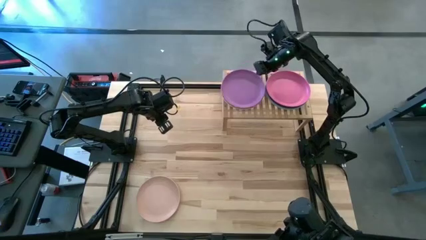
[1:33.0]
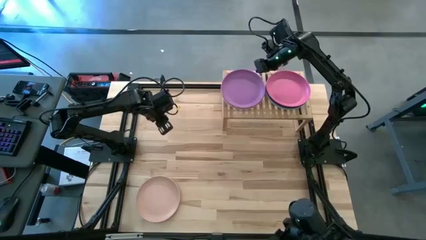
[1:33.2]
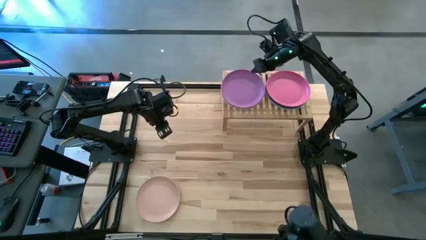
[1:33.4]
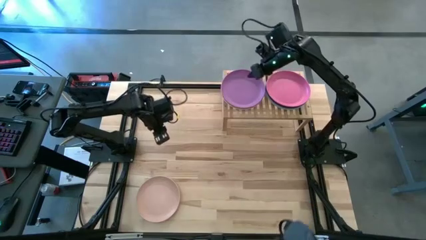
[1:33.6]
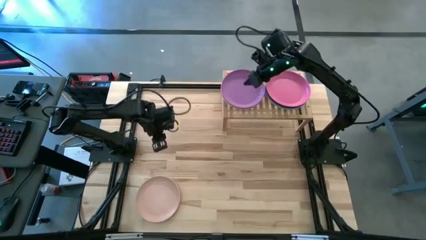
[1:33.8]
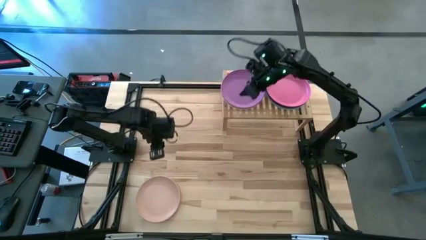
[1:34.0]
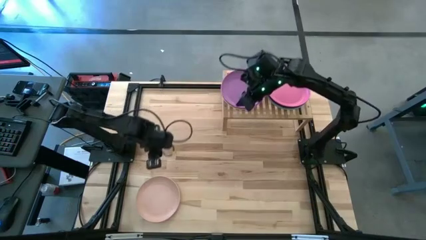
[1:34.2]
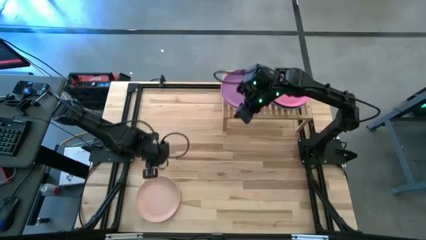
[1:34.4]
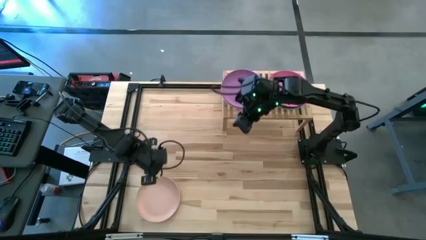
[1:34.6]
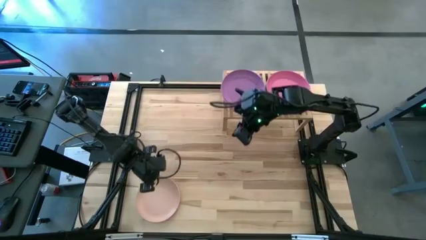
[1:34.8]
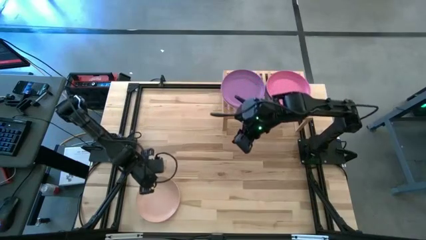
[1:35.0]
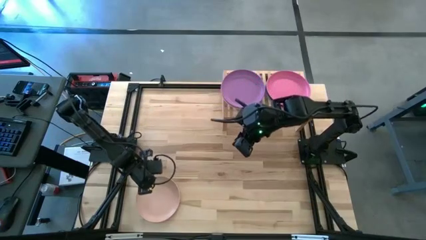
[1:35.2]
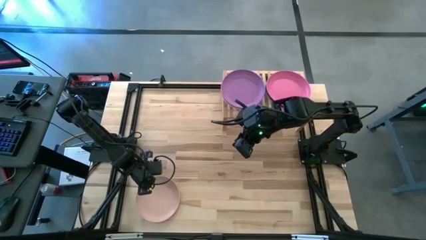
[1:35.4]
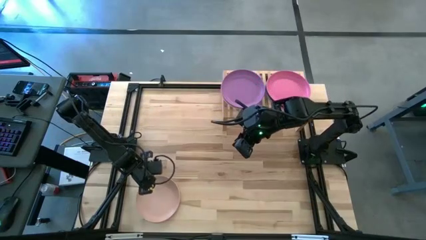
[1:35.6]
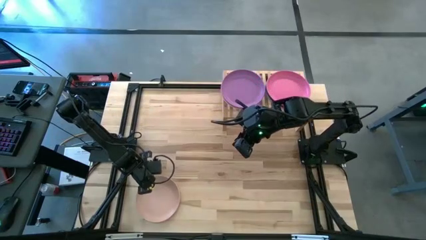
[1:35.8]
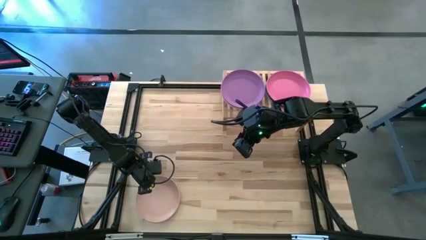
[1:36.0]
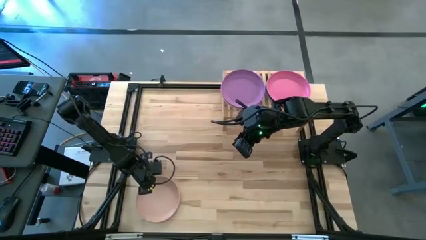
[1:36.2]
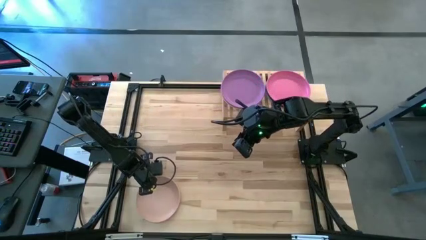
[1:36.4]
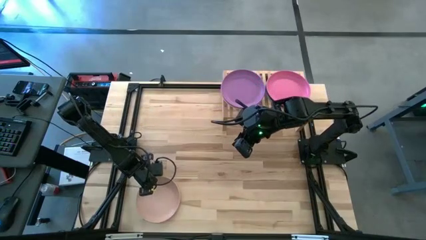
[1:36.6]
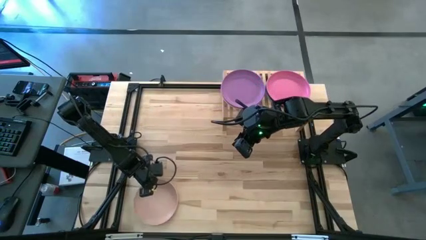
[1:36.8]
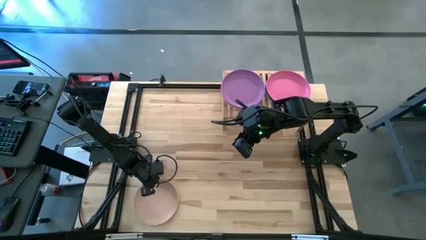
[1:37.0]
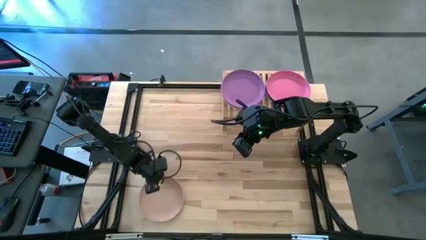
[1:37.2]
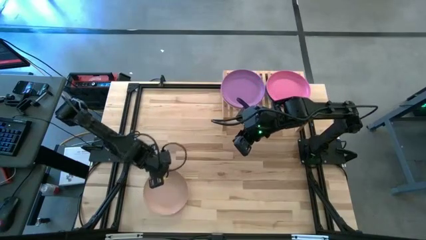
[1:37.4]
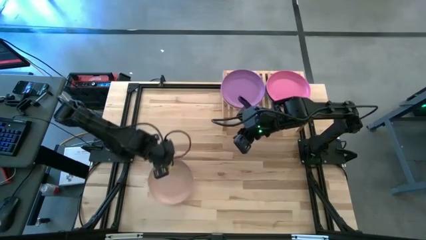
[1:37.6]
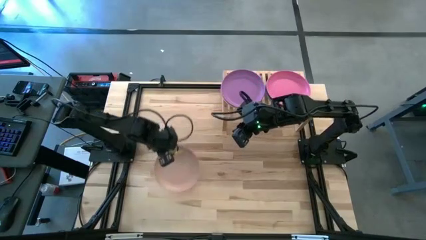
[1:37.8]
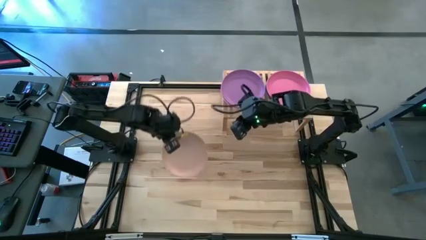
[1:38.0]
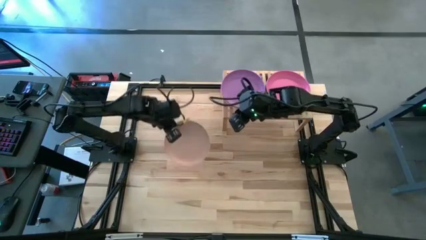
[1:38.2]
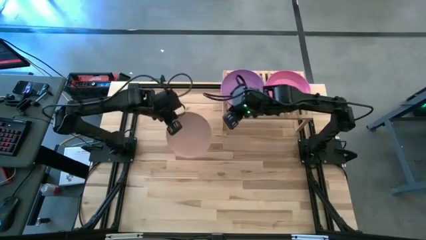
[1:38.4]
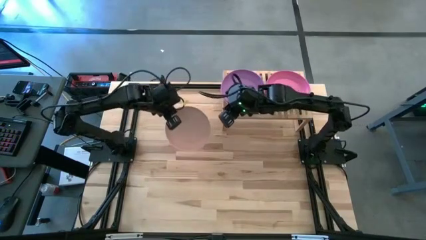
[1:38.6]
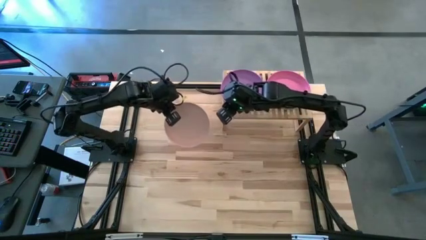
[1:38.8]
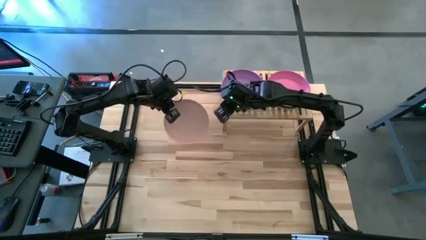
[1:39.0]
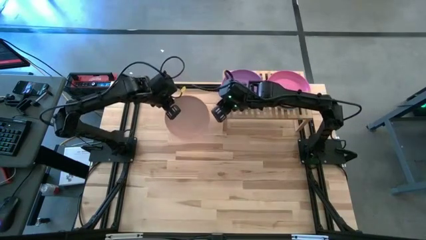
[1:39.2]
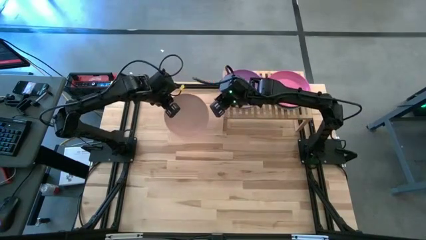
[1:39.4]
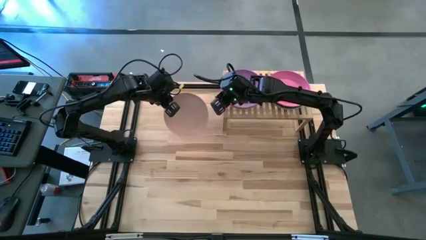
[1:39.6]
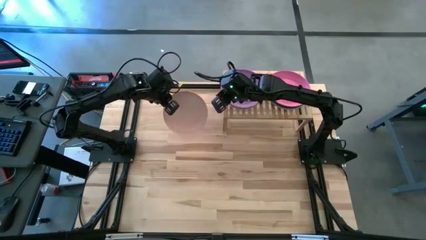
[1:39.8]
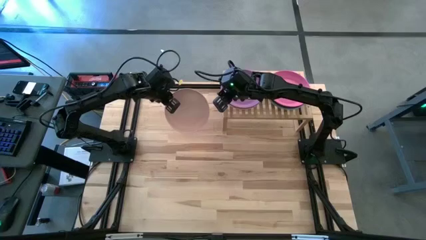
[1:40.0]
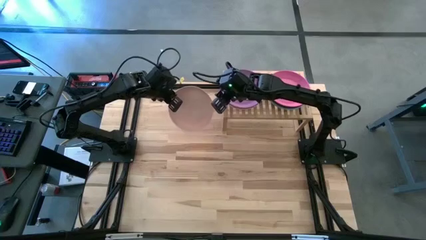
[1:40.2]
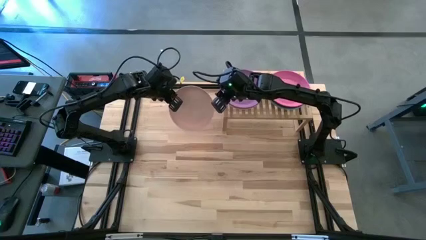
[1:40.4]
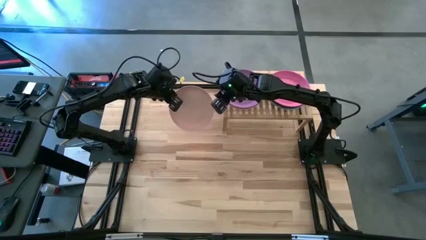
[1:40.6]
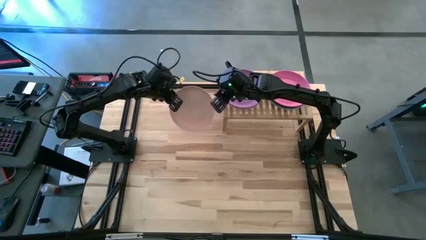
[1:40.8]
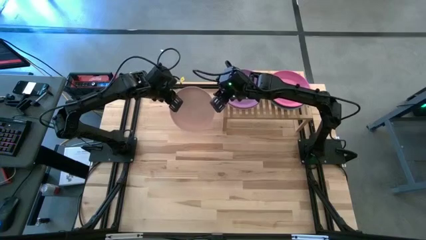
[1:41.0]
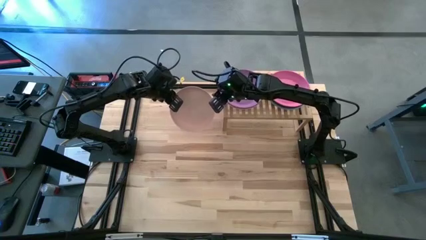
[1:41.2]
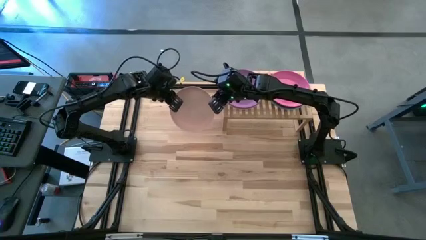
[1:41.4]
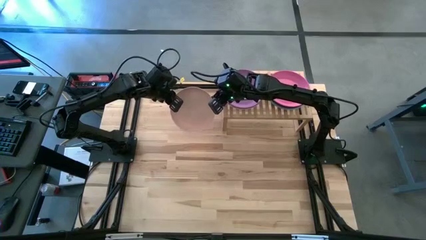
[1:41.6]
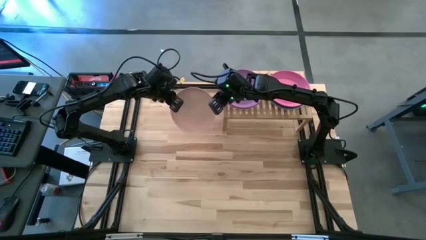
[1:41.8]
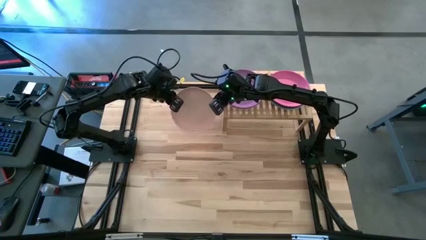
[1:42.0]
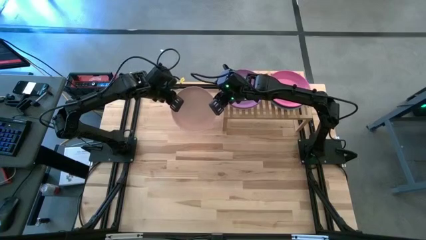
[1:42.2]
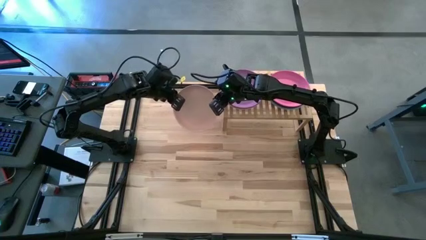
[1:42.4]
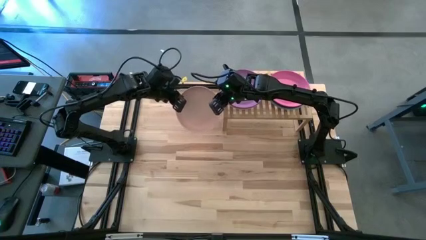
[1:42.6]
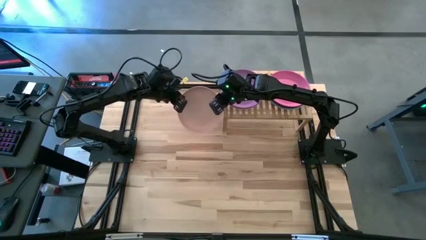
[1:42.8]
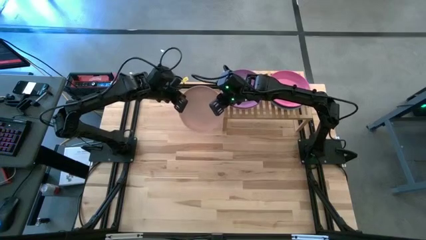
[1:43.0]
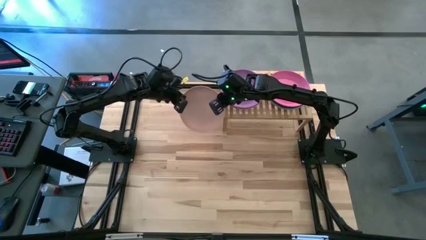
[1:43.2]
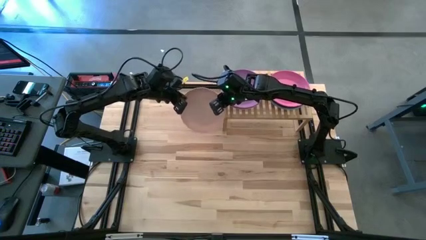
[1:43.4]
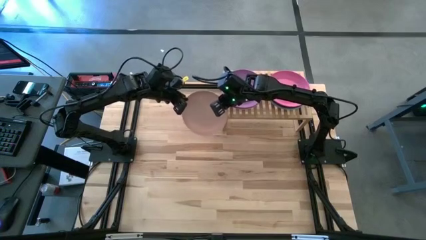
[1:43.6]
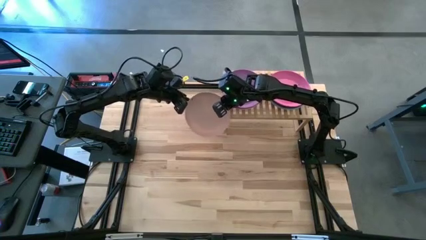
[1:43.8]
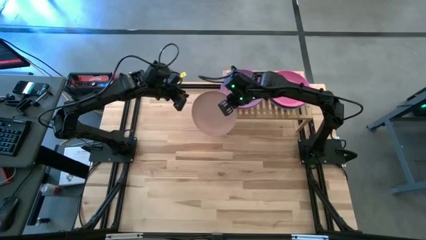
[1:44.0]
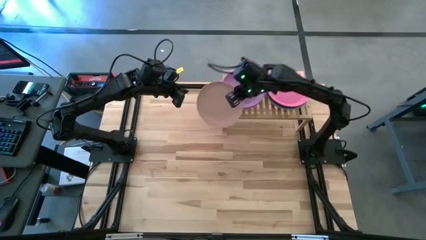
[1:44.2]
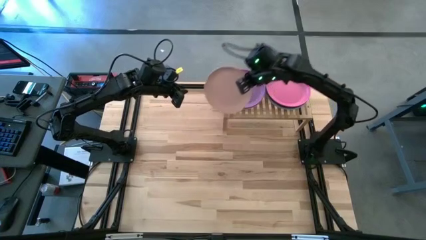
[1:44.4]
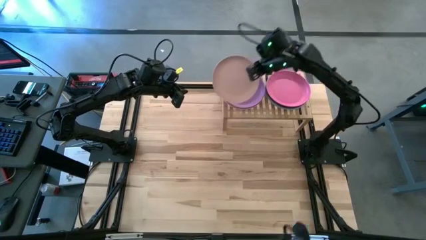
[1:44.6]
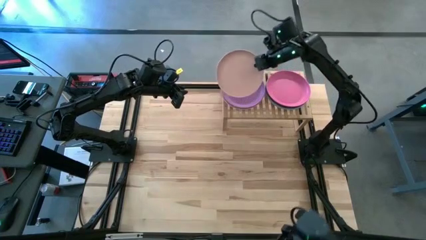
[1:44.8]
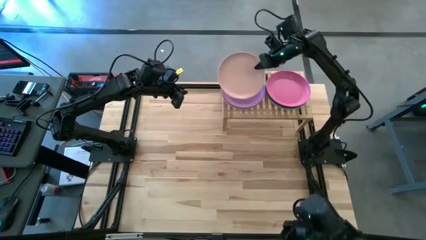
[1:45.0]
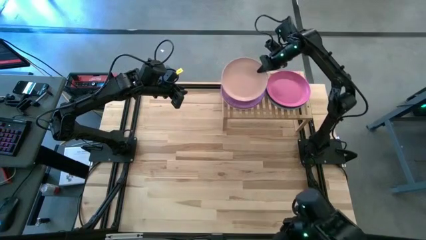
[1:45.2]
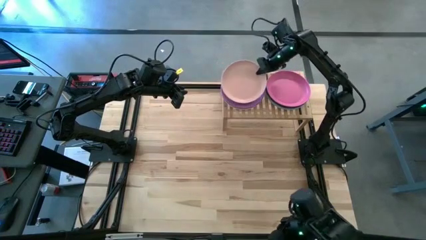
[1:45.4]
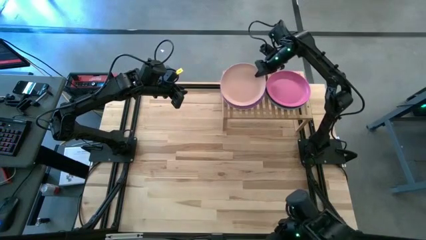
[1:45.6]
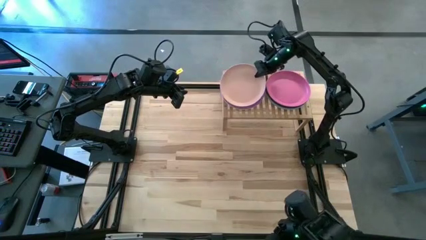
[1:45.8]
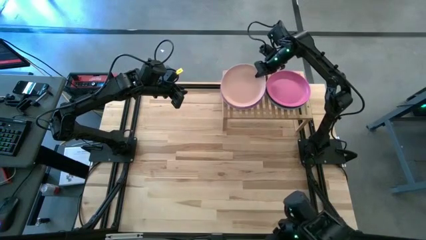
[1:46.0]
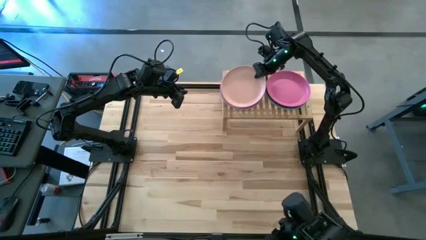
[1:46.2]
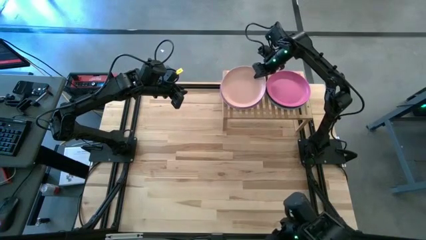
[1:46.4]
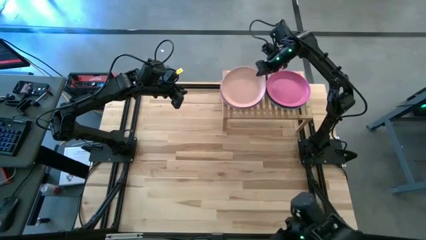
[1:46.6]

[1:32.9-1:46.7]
Task: Place and stack plates onto a shelf
Stack the light orange plate on top of the purple plate on the shelf

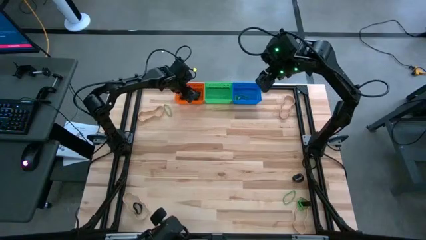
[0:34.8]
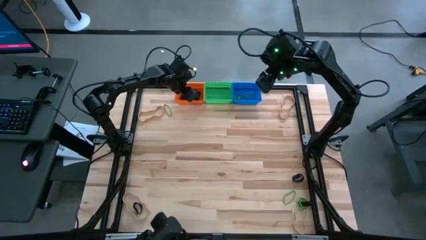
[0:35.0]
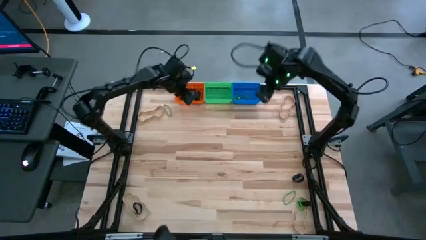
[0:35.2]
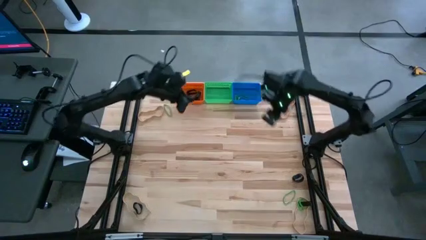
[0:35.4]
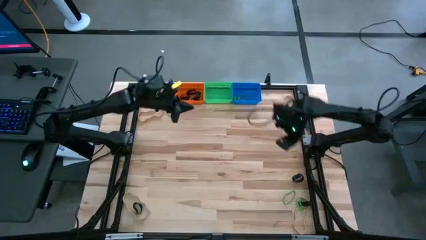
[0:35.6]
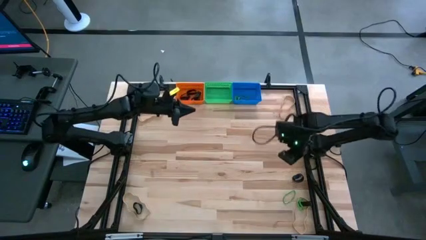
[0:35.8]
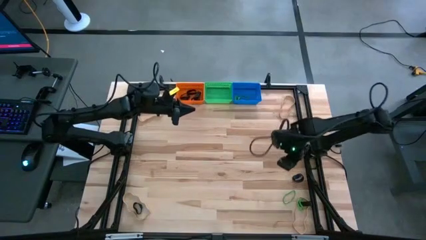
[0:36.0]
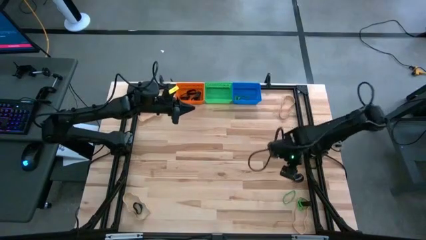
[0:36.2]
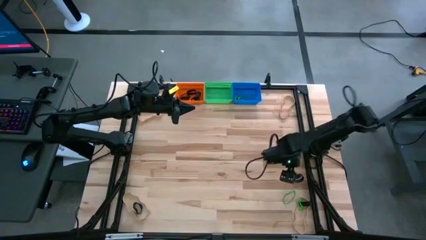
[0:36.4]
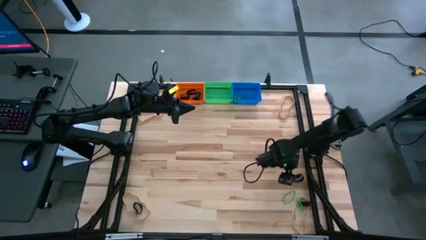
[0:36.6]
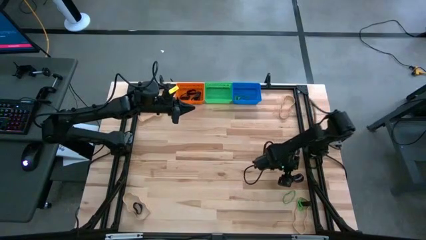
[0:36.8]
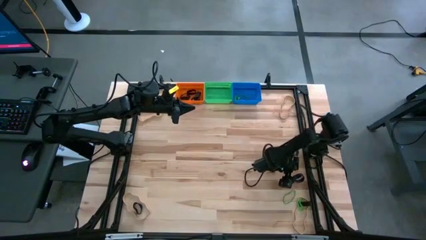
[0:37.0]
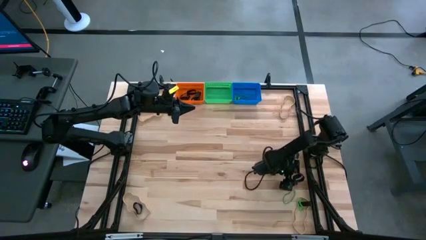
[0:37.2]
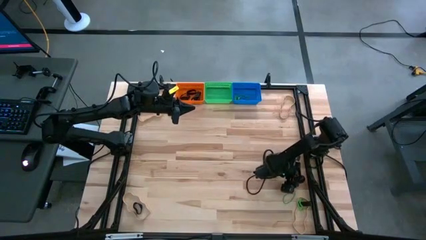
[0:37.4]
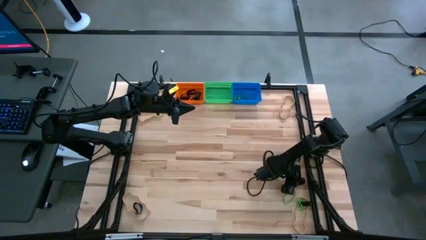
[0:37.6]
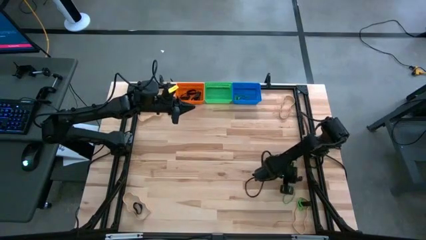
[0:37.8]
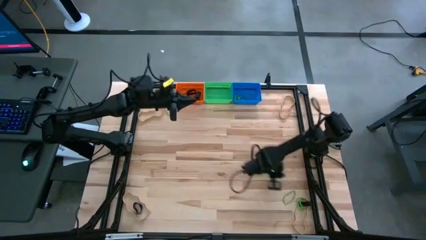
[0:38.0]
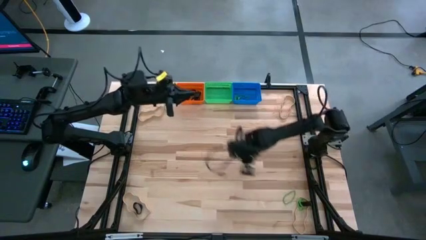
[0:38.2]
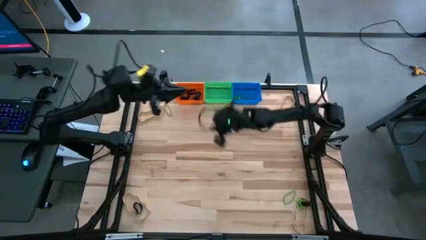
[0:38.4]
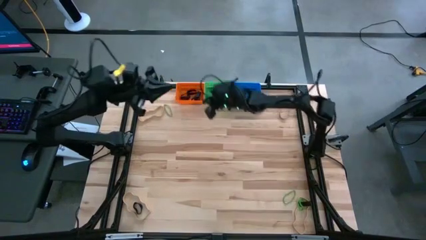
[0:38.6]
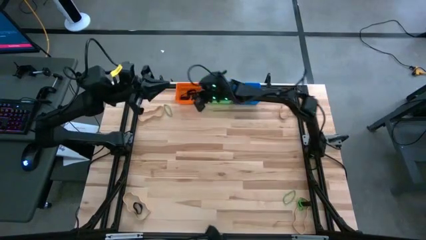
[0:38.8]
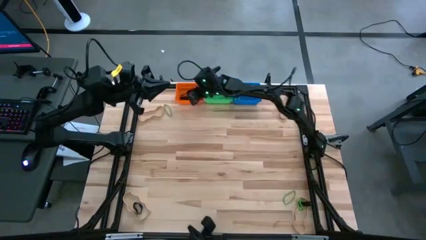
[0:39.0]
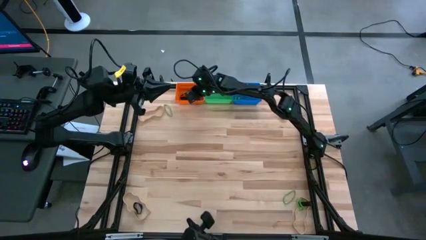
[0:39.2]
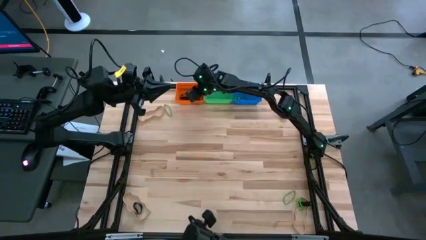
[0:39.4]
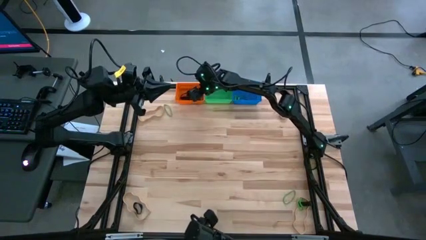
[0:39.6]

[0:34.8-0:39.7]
Task: Sort rubber bands into baskets
Put the black rubber band into the orange basket
